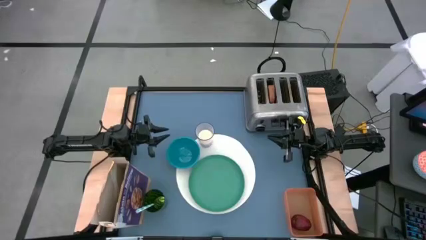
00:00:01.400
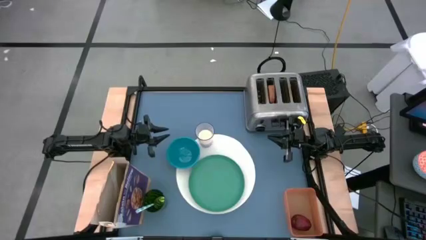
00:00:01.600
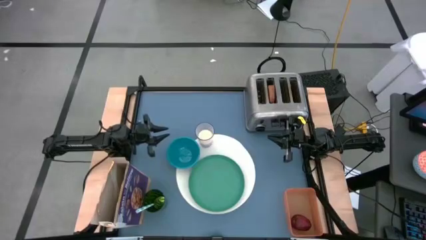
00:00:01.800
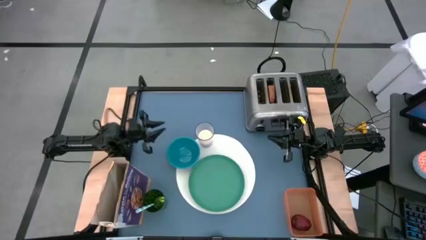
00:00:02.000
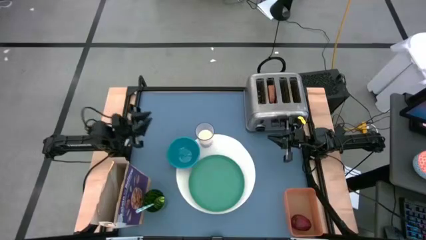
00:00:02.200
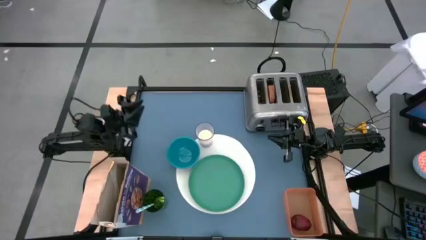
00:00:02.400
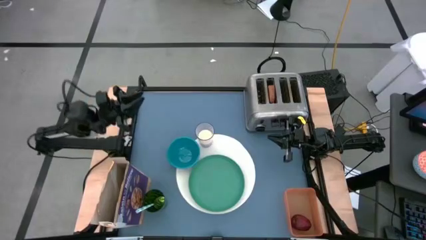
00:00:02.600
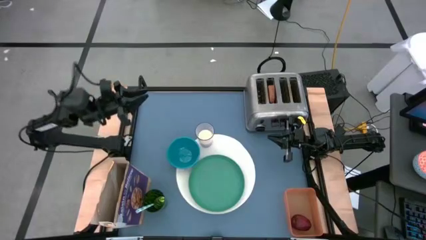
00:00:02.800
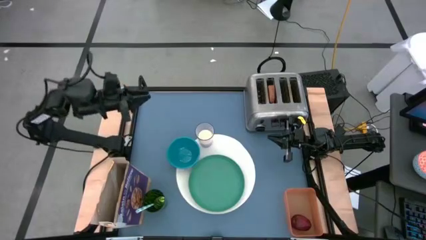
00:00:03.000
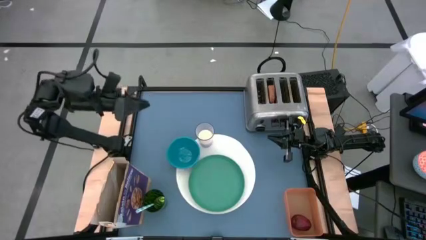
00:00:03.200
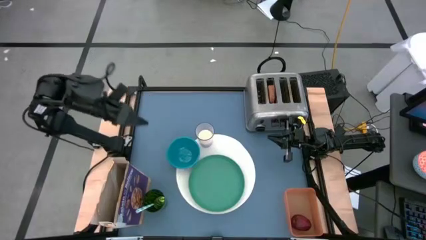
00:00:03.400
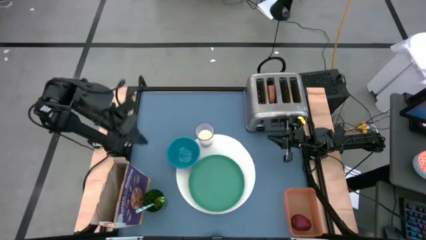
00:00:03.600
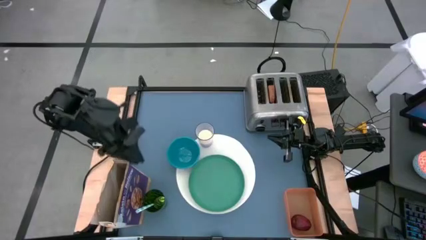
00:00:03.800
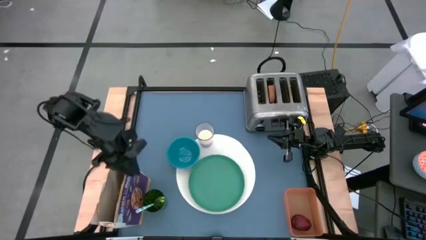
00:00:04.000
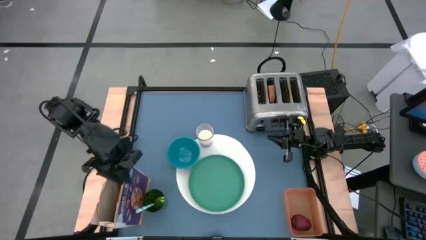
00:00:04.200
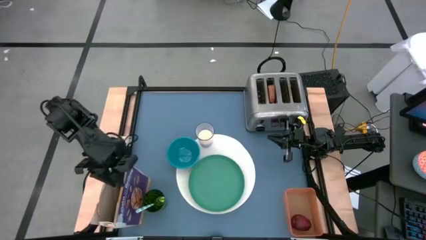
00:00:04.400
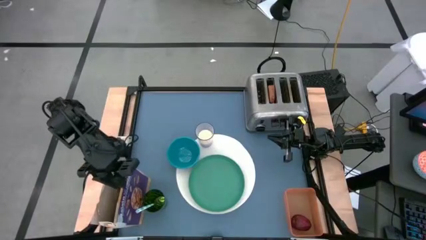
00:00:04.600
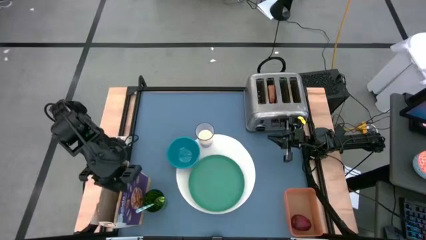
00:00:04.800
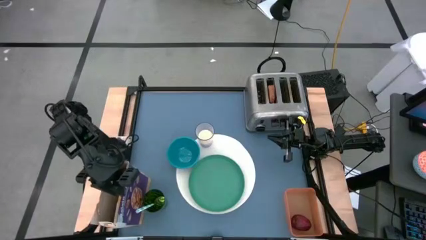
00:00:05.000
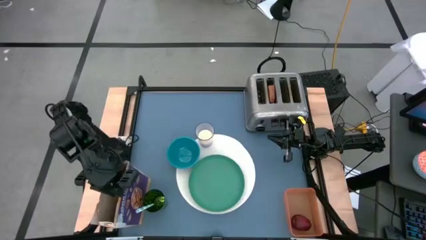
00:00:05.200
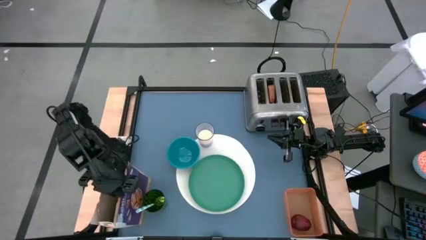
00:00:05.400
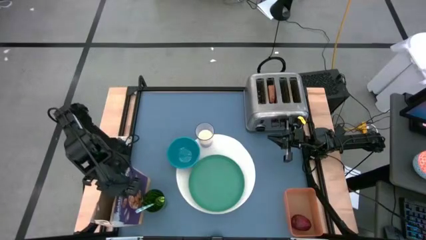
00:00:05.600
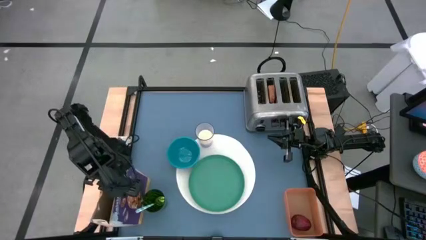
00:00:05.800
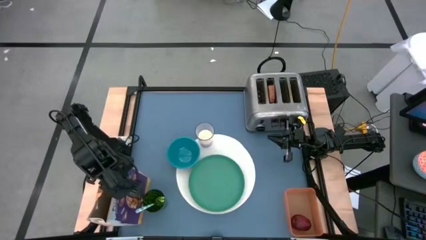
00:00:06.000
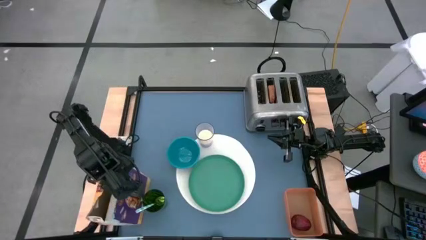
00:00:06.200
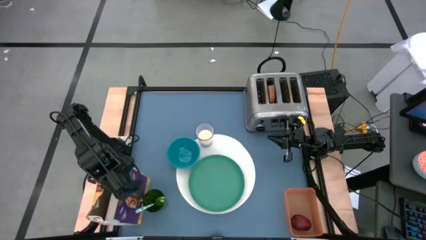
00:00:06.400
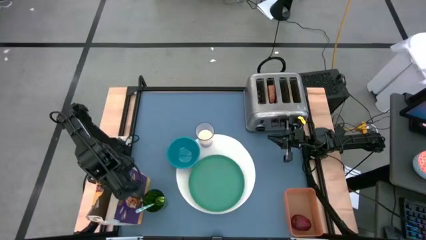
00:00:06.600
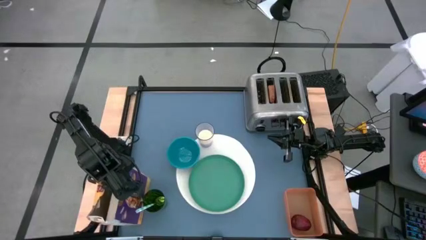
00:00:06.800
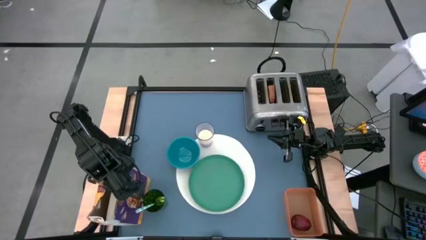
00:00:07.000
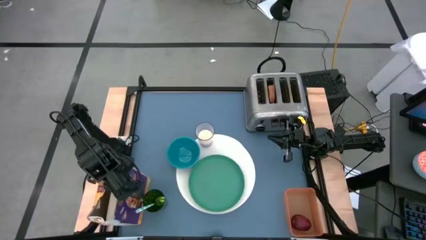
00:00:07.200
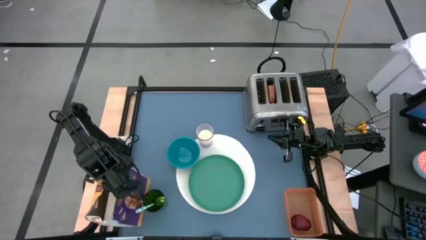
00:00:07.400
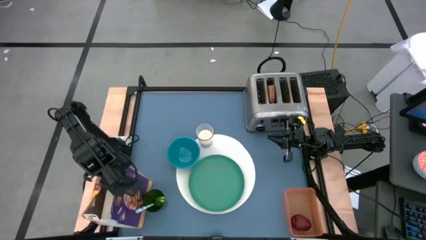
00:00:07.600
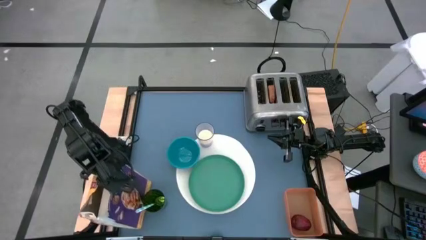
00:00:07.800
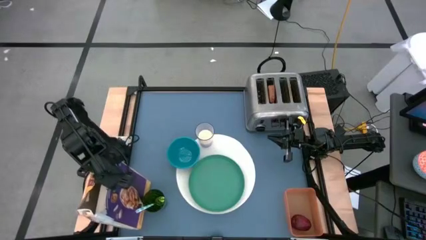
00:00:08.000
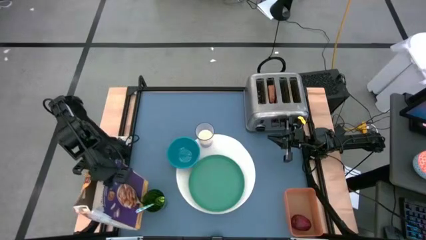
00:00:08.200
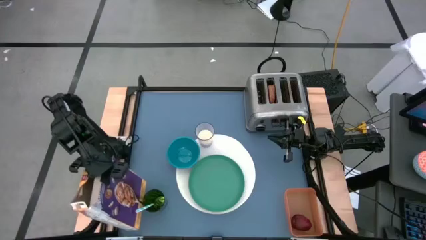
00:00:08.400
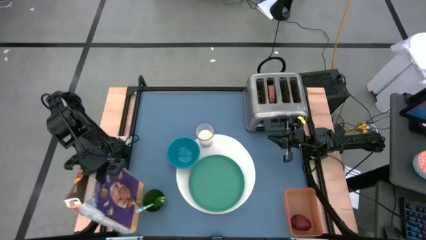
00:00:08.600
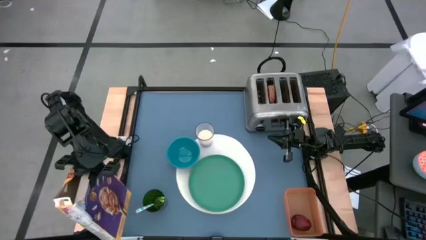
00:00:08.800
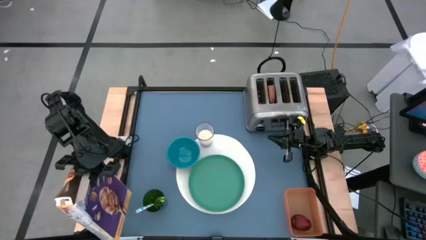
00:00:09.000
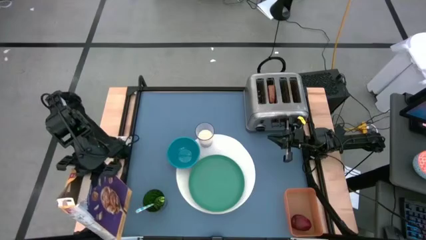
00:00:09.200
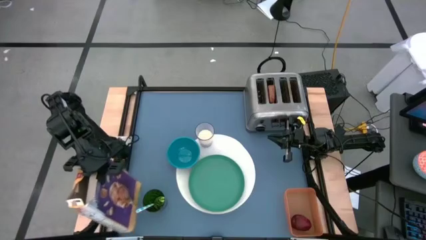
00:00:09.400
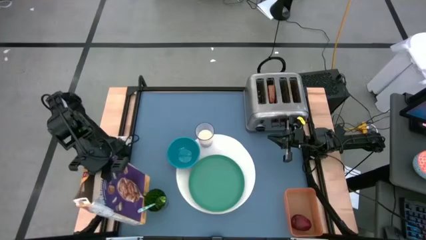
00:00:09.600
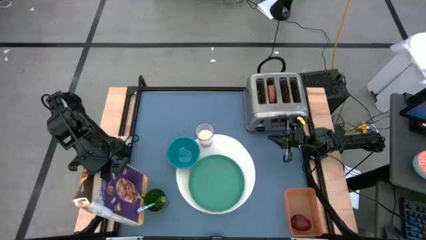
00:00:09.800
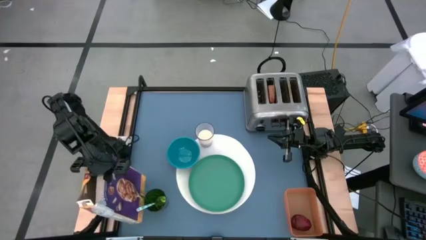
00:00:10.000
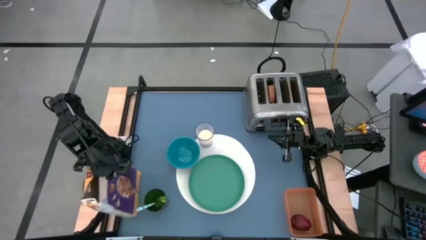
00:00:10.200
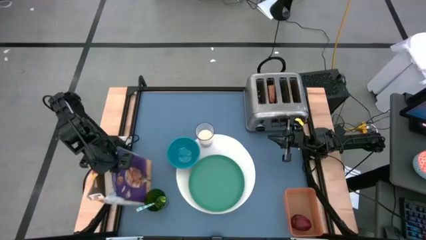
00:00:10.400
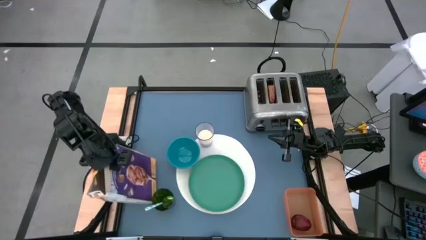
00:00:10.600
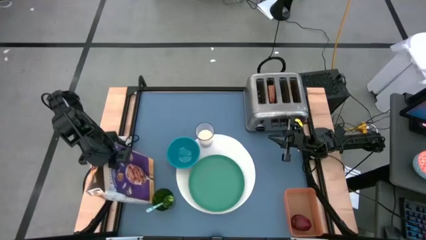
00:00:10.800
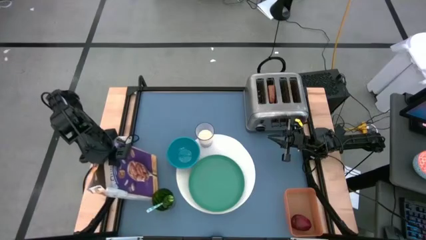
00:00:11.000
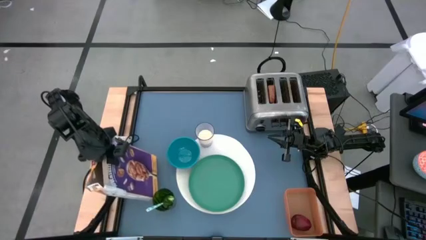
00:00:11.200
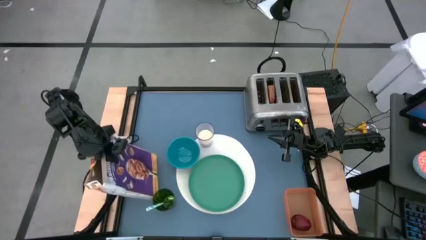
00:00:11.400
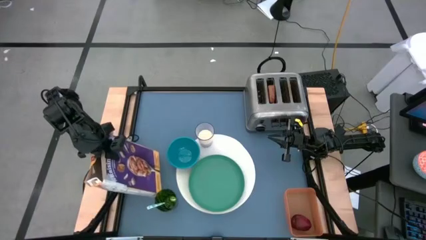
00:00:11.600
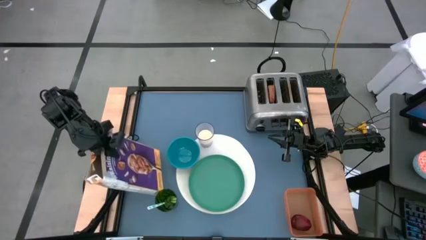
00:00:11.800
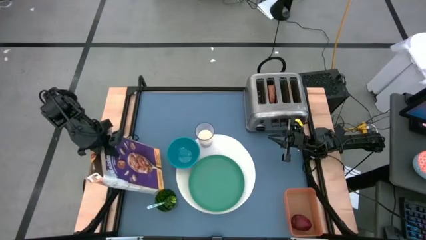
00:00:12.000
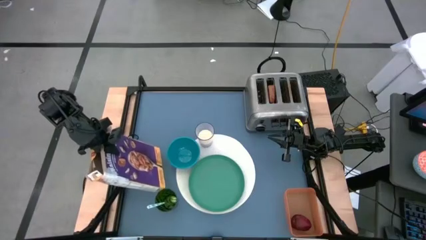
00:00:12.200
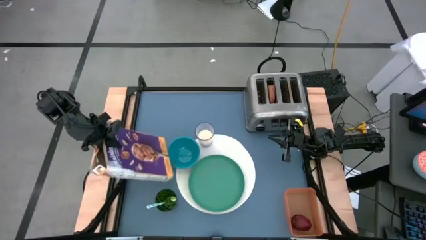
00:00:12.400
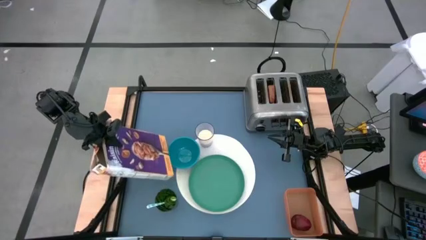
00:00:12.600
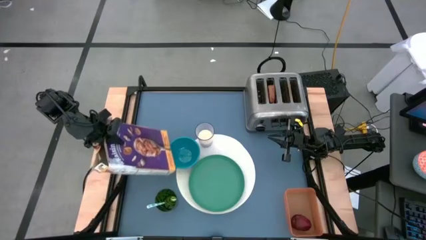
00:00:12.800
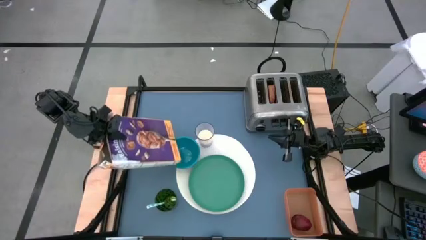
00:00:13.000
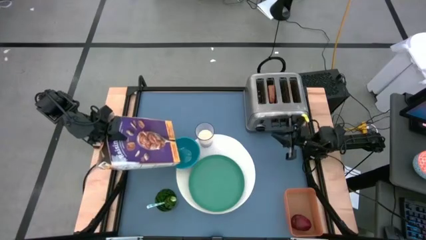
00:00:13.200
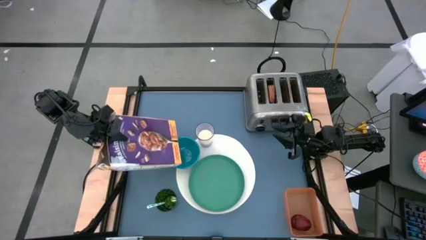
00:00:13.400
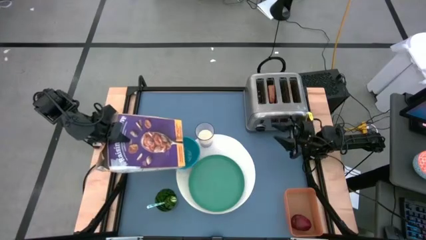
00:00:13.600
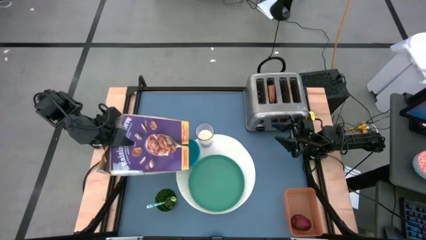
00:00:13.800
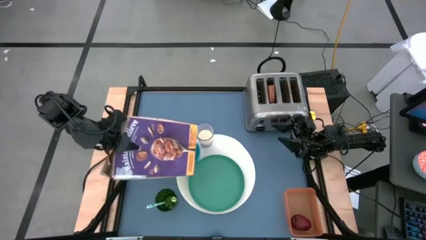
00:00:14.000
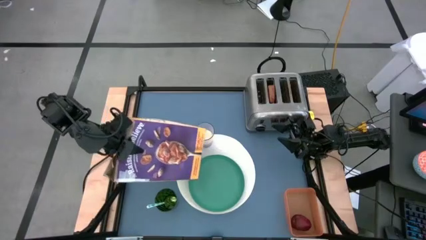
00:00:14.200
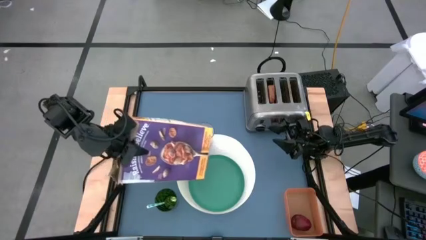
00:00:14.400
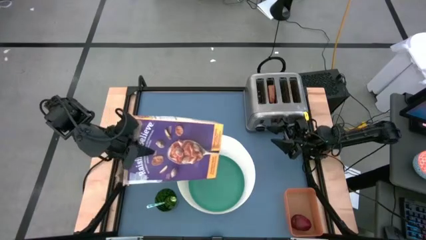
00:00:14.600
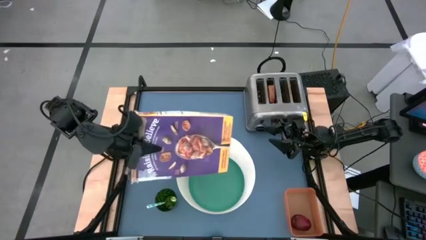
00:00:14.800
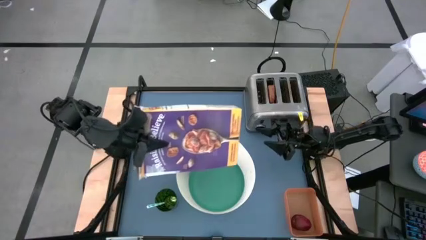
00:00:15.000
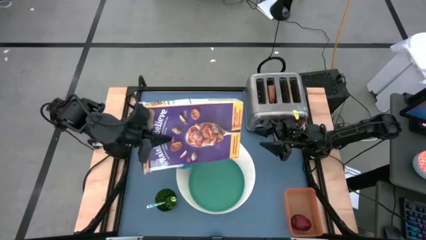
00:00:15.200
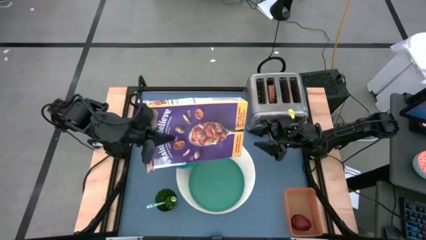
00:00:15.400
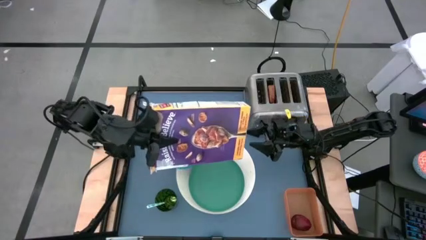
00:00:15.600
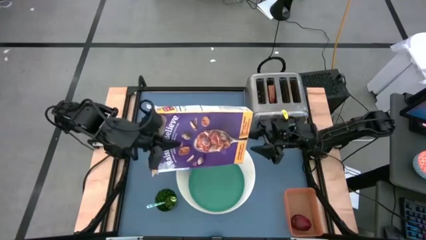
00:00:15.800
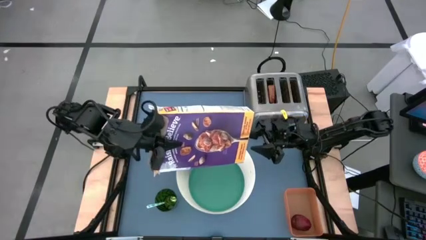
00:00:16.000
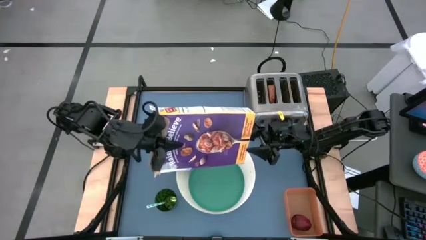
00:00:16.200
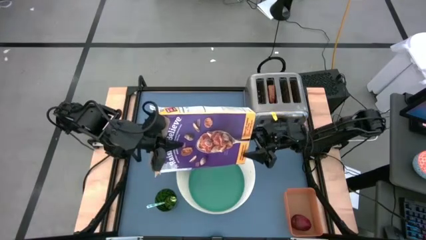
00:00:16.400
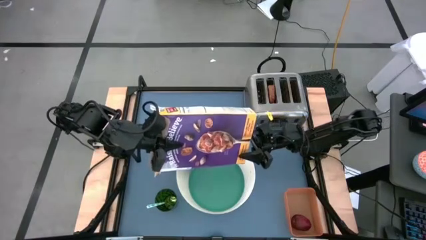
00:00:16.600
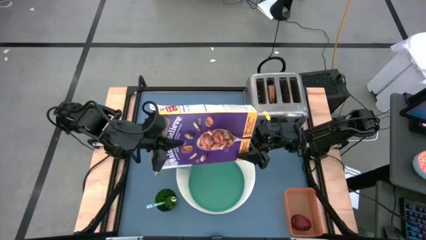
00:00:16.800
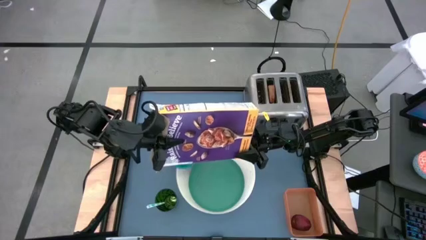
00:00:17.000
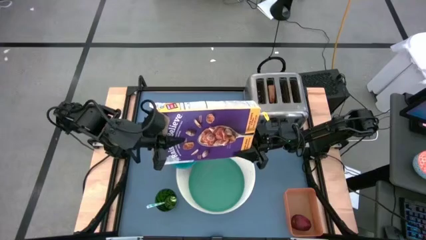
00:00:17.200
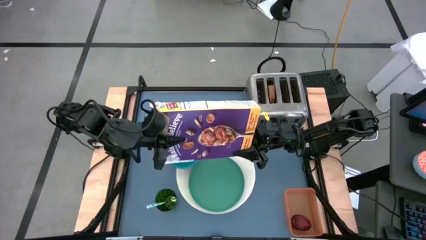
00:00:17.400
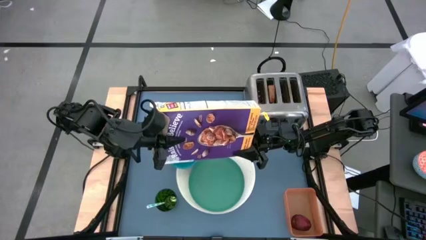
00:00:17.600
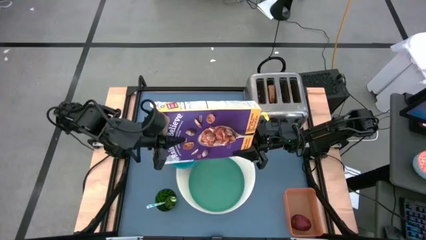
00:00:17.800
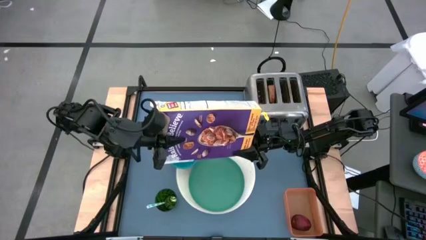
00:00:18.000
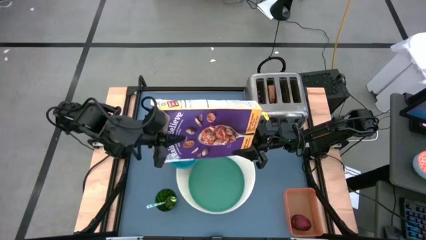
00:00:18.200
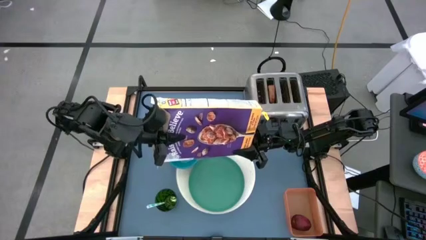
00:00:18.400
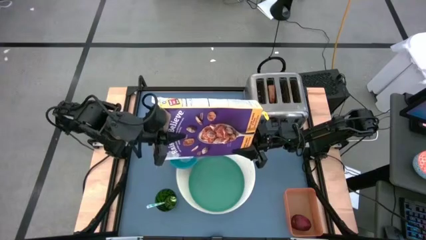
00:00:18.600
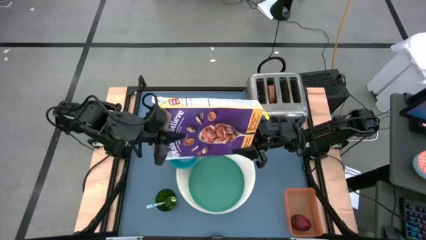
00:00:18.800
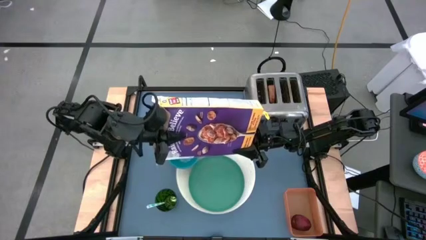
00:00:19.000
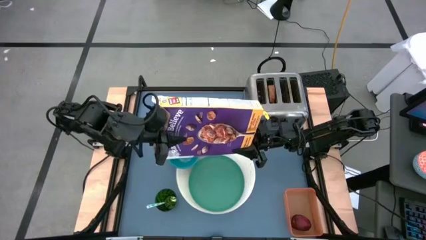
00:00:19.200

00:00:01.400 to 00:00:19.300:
Task: Arrange a breakfast setting
Pour the cereal into the blue bowl
